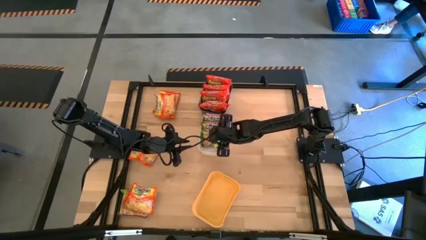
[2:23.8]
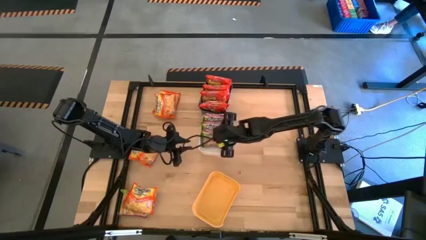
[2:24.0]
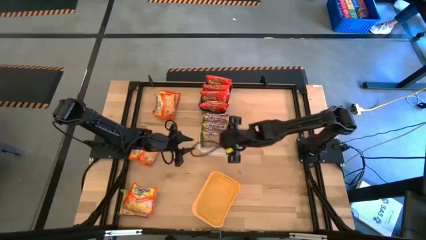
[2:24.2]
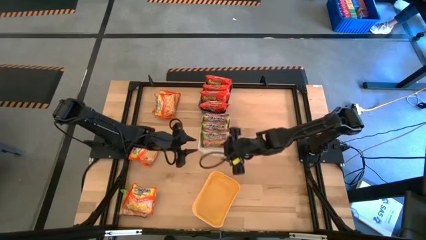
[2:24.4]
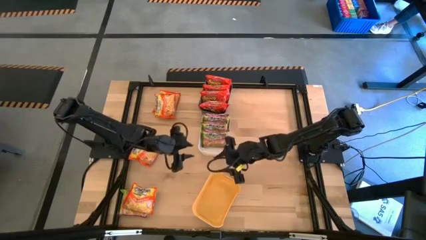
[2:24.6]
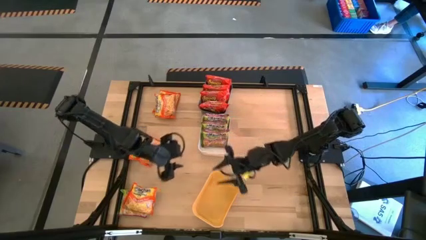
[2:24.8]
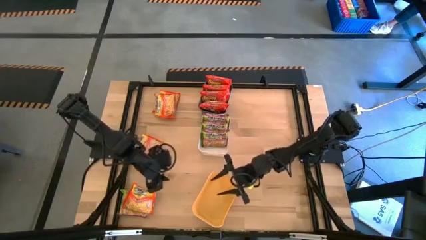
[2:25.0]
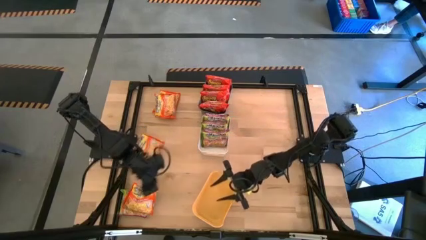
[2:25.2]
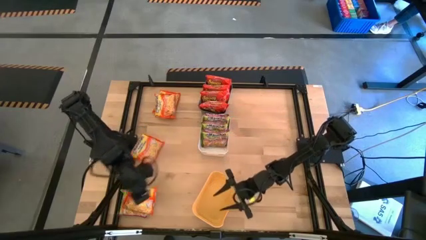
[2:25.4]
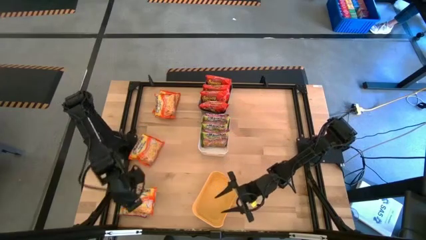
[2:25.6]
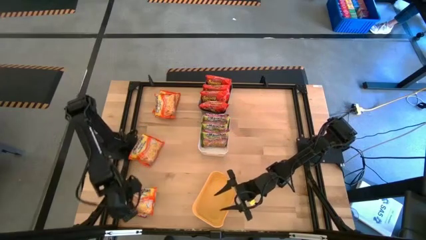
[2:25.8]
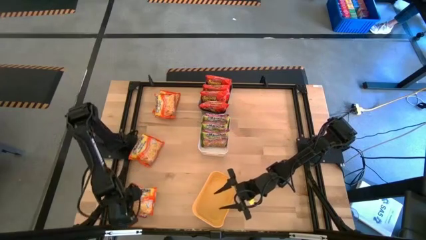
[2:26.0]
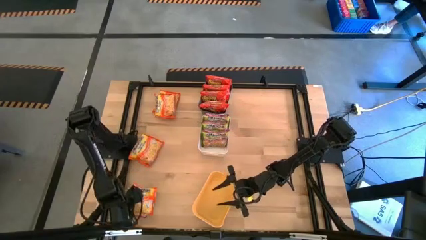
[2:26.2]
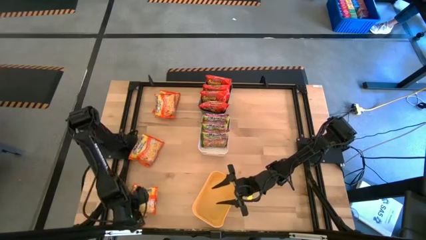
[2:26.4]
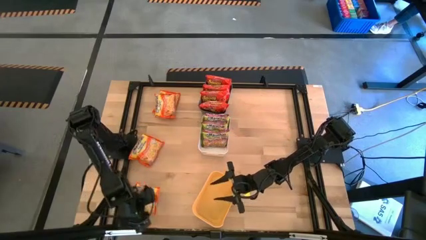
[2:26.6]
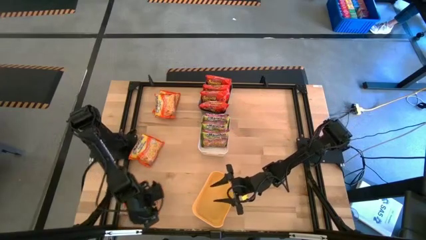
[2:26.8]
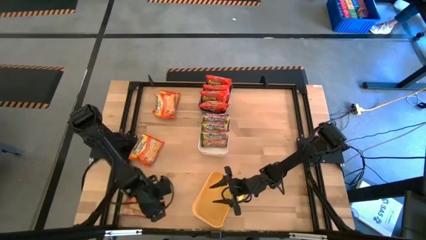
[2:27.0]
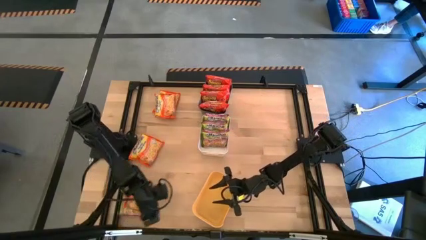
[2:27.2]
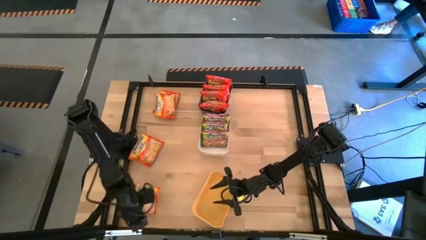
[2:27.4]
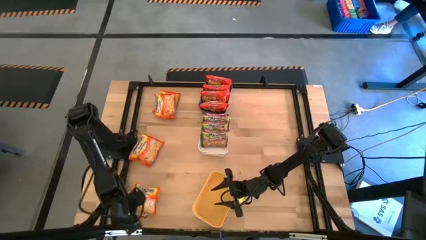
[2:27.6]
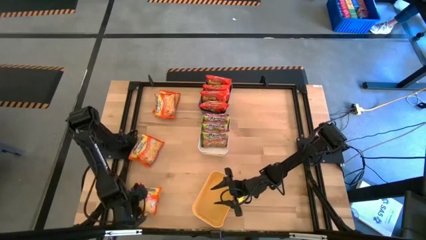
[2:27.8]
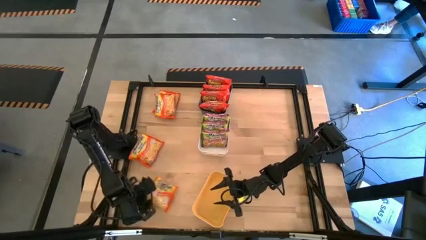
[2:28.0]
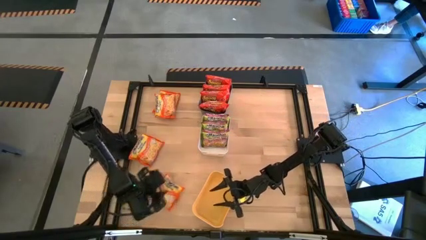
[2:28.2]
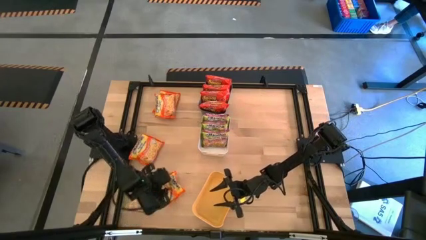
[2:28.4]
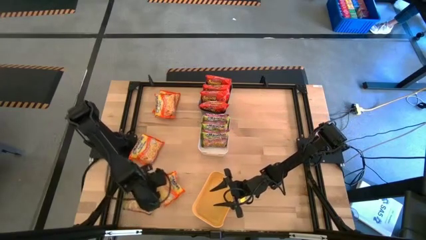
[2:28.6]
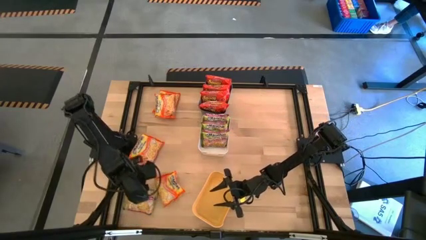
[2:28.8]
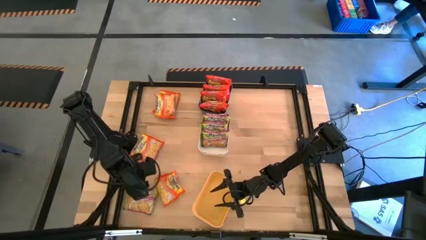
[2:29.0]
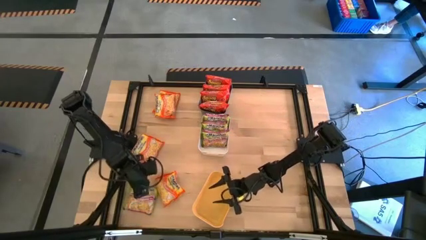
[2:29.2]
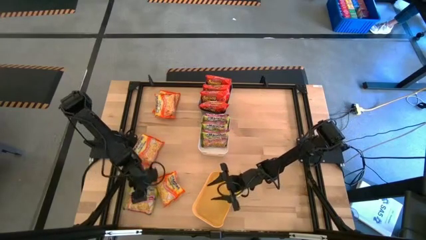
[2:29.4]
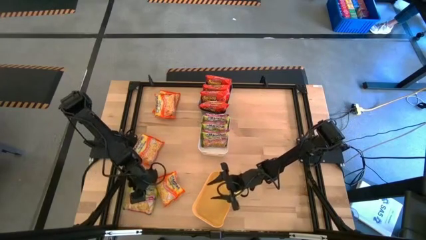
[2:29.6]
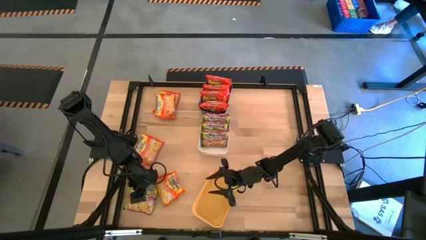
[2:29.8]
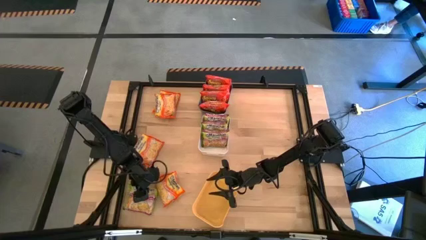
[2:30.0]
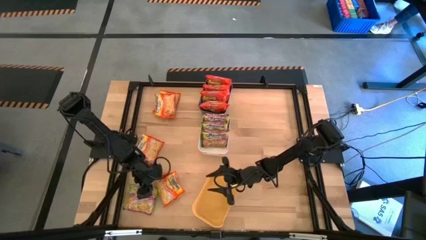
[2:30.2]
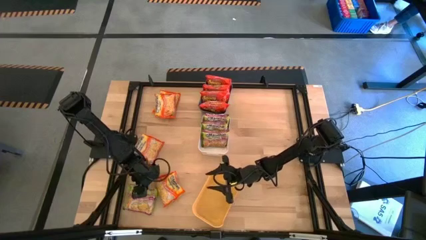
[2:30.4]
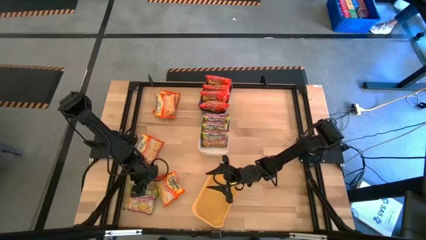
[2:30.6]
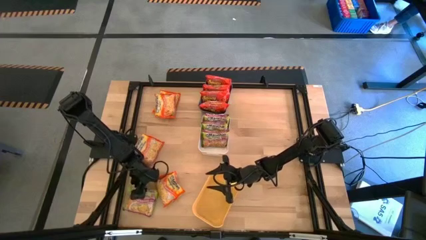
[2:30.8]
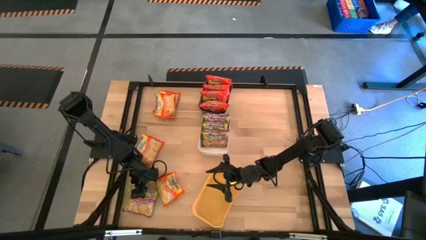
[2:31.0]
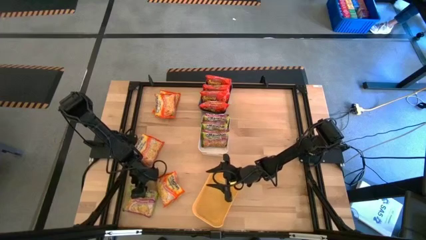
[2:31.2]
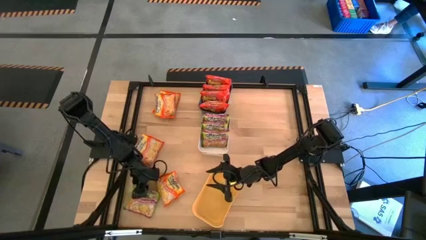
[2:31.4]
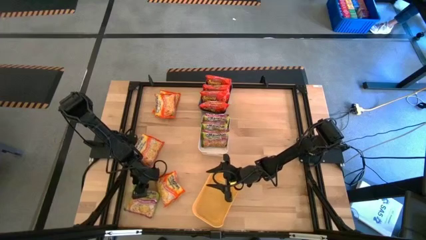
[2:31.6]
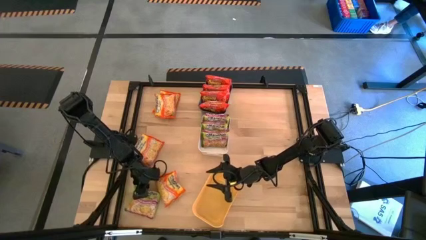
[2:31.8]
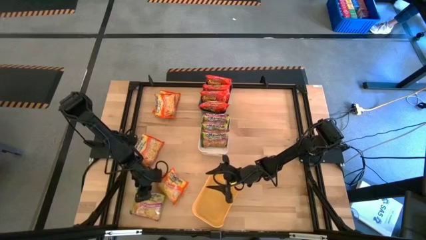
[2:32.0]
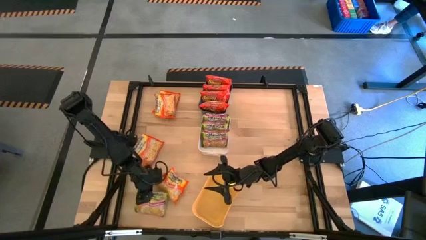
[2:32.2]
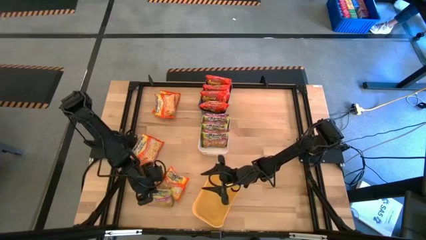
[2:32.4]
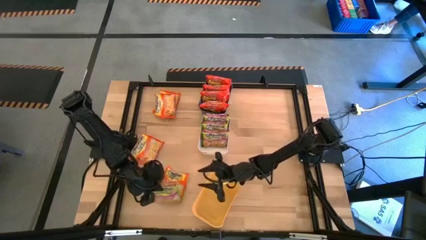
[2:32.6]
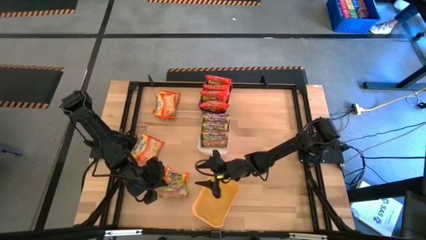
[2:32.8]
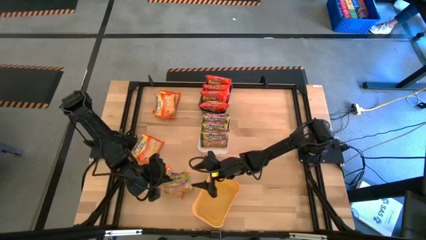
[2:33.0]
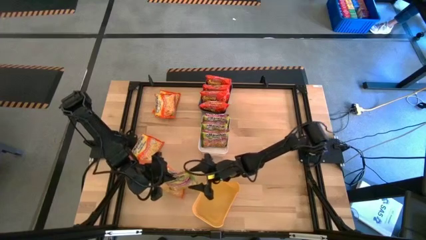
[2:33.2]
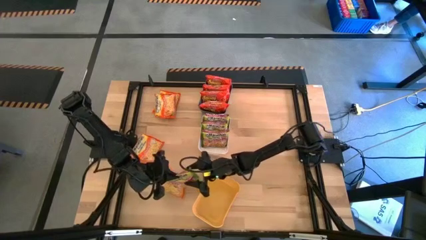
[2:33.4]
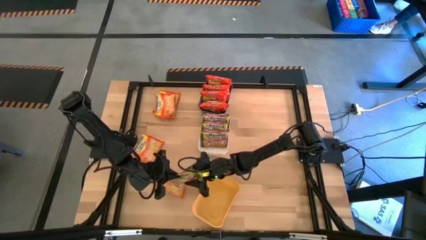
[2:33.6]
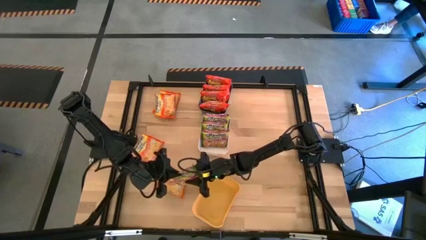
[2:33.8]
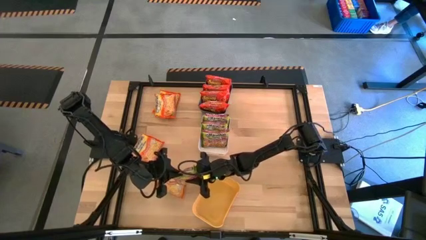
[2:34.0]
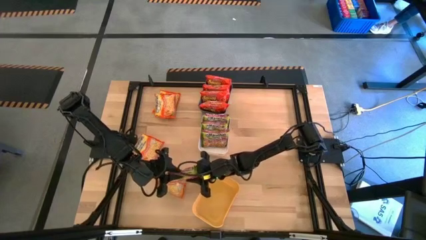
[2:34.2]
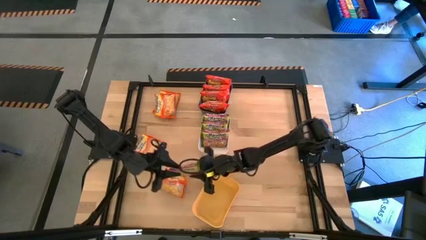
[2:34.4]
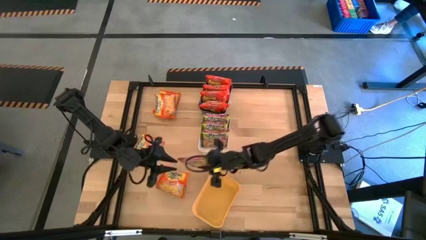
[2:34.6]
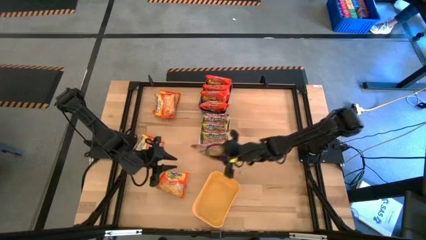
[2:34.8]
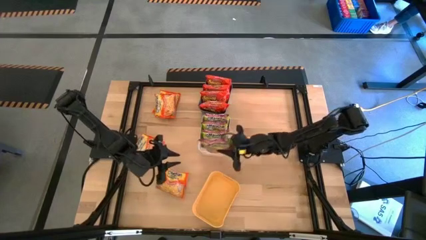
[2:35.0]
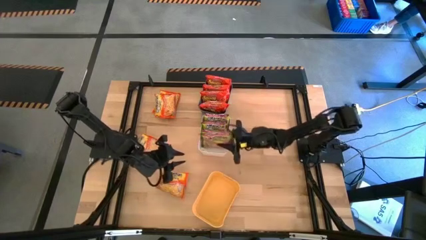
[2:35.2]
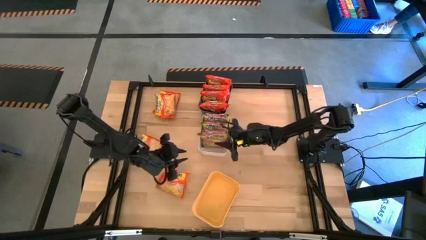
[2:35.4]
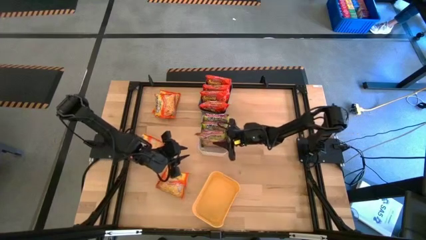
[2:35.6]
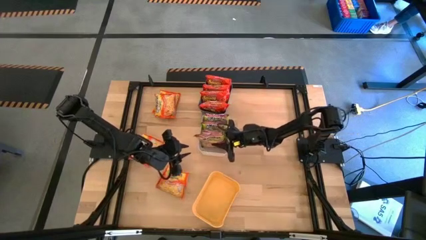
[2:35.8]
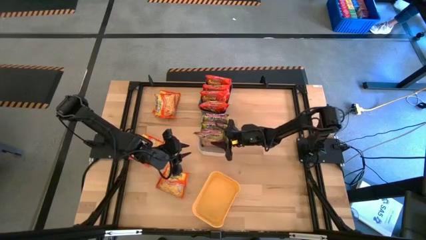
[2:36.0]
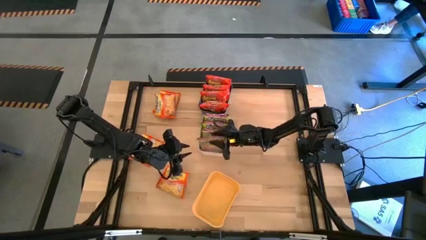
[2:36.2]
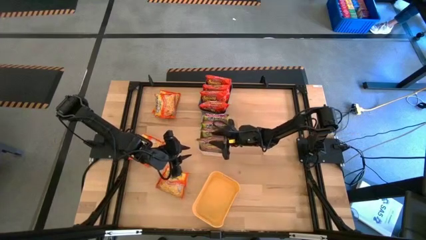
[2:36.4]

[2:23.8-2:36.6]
Task: Sort Maruchan noodles
Put the green noodle pack into the white bin

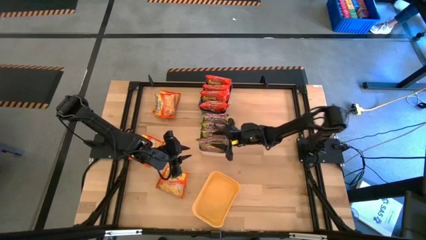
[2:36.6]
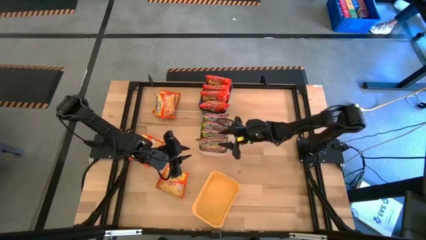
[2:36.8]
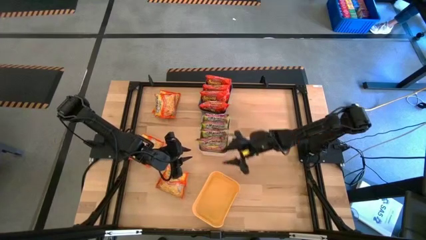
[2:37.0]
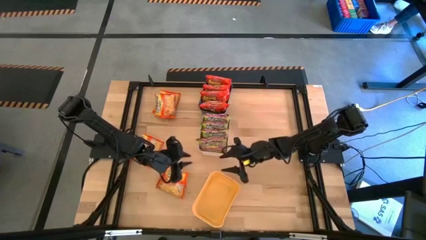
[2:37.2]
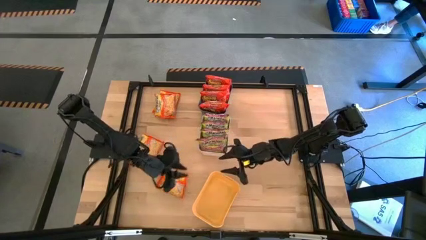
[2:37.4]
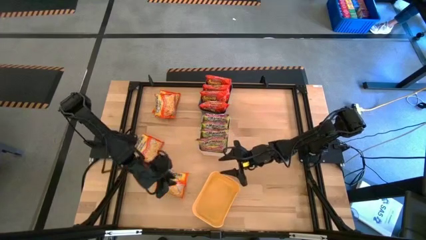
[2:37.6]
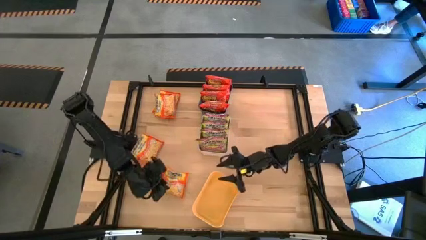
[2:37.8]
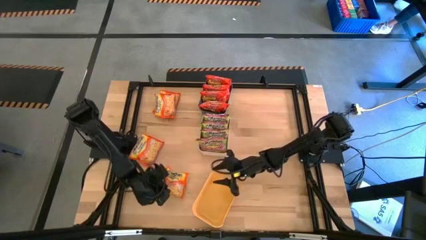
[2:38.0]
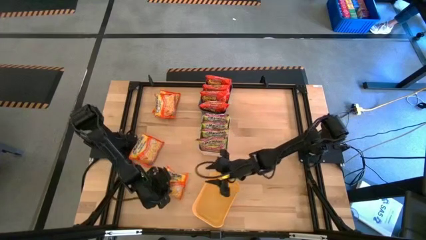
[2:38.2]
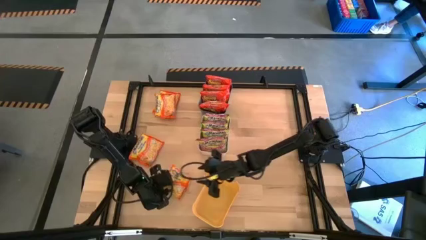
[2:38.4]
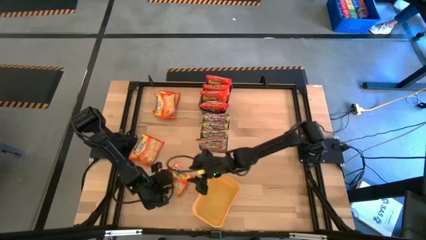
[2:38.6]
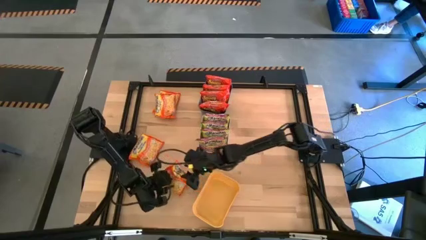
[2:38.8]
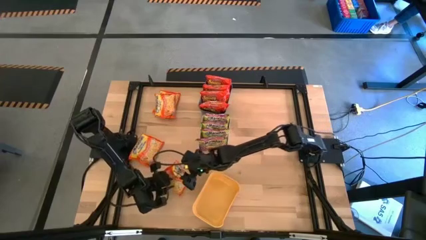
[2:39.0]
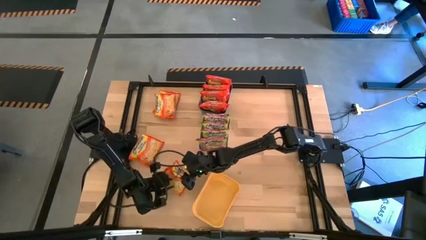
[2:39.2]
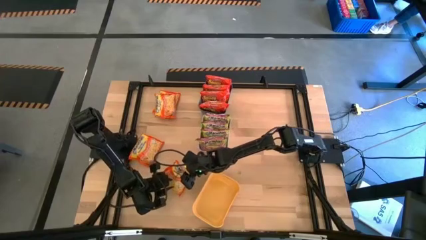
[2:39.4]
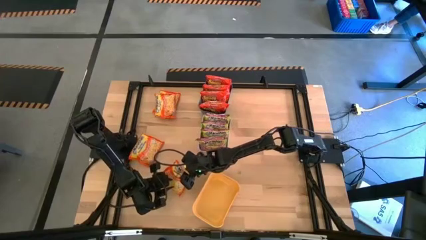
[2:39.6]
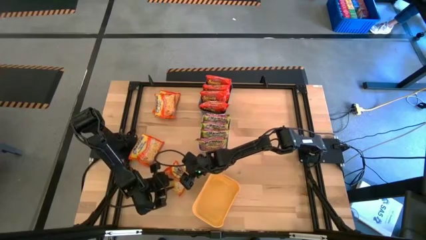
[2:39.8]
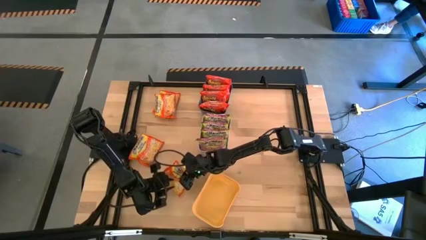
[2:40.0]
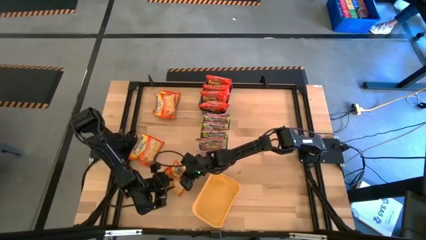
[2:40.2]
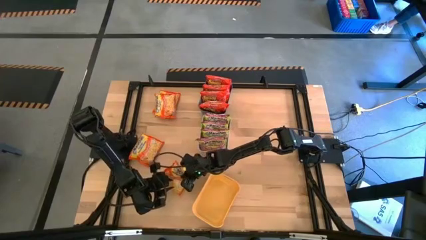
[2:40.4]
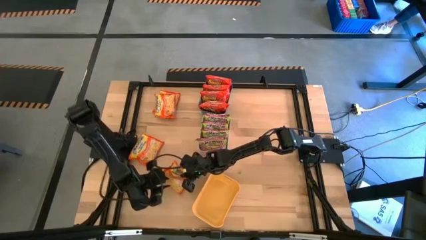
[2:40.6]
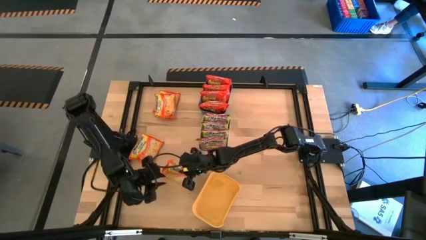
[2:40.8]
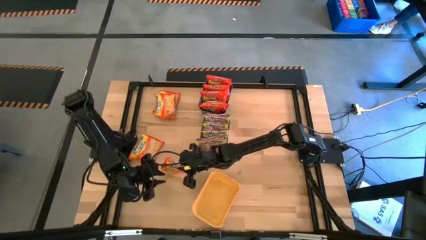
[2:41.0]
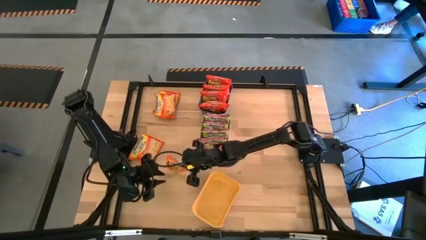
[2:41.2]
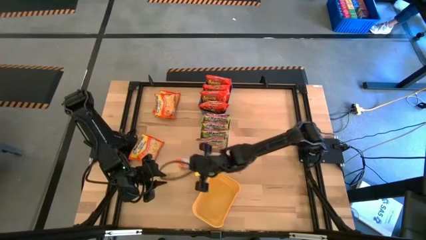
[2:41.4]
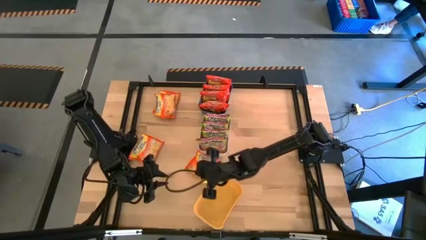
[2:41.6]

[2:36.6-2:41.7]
Put the orange noodle pack into the yellow bin
